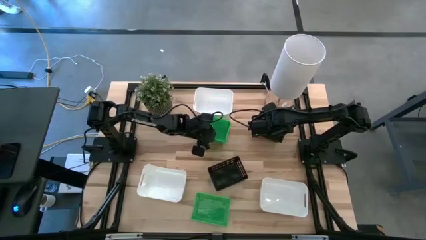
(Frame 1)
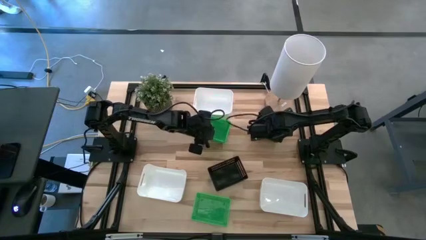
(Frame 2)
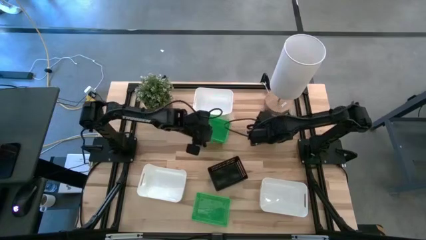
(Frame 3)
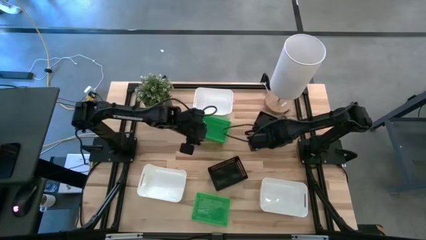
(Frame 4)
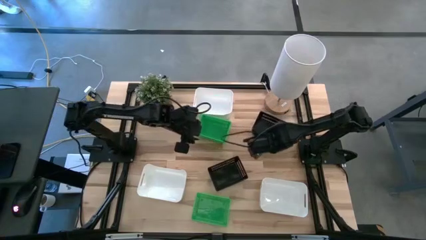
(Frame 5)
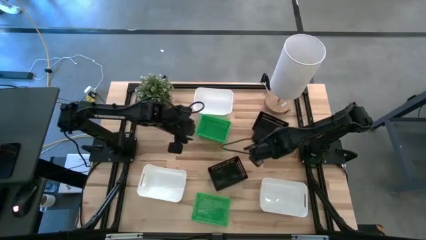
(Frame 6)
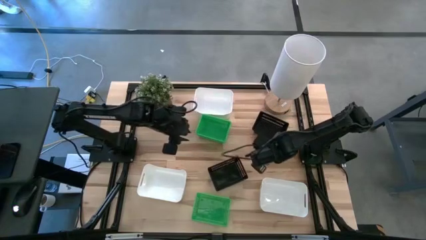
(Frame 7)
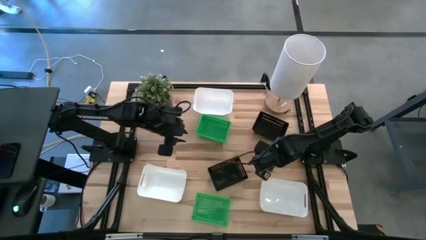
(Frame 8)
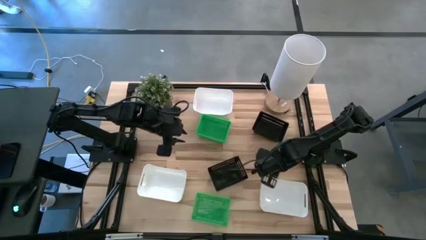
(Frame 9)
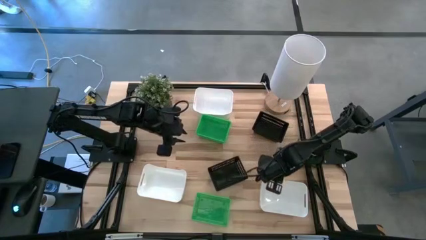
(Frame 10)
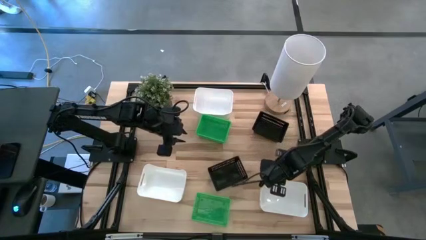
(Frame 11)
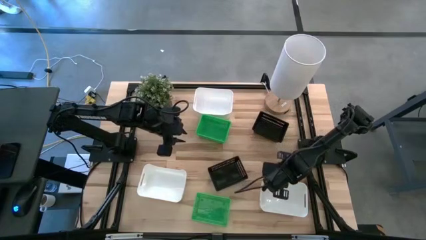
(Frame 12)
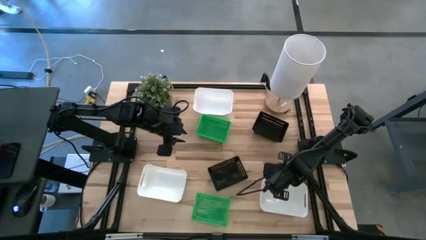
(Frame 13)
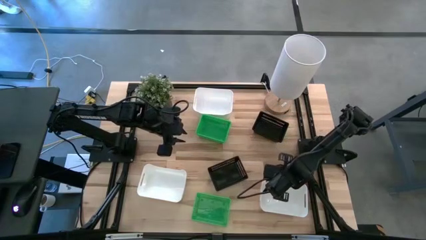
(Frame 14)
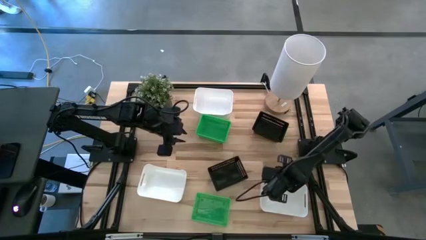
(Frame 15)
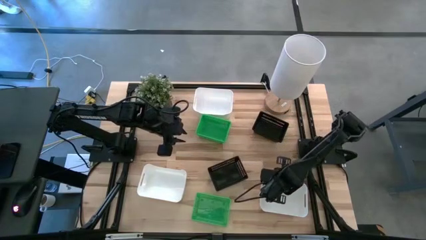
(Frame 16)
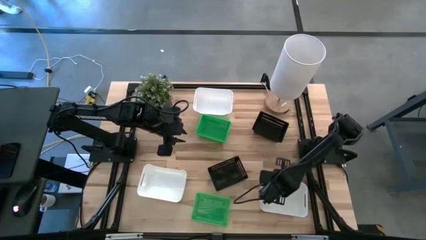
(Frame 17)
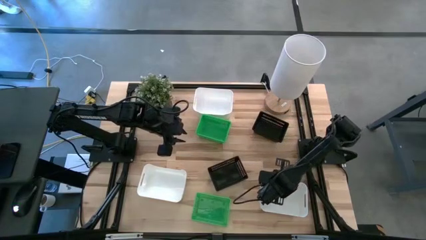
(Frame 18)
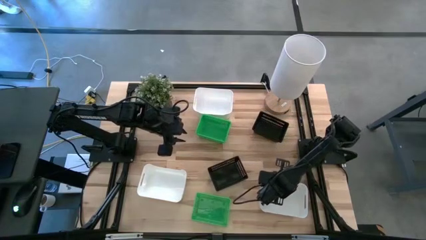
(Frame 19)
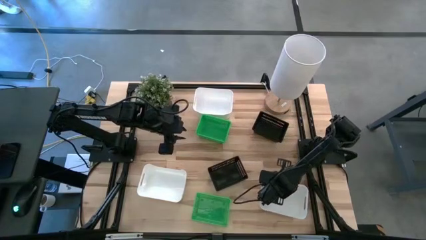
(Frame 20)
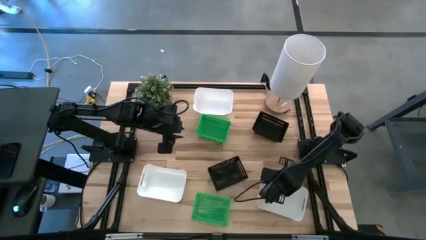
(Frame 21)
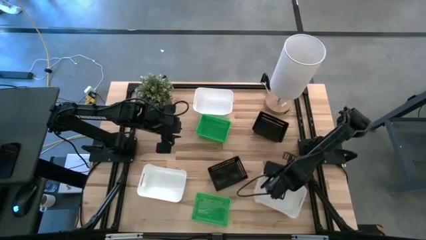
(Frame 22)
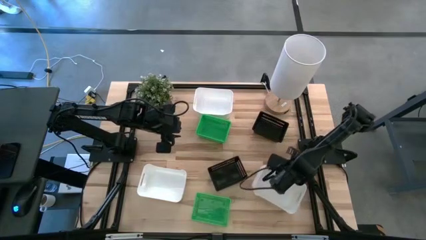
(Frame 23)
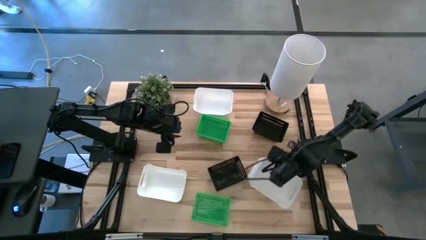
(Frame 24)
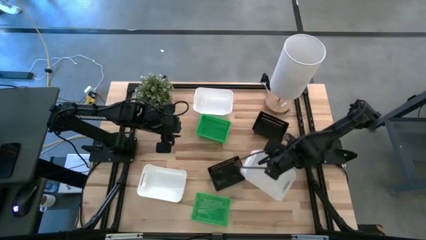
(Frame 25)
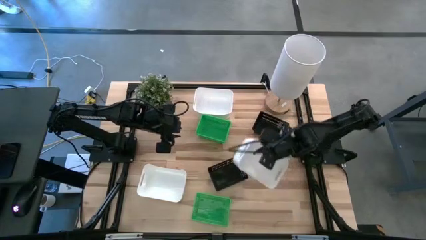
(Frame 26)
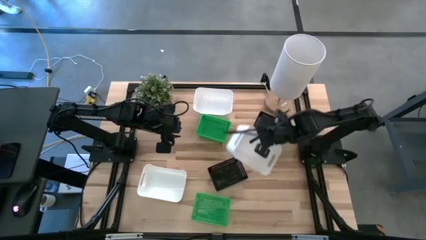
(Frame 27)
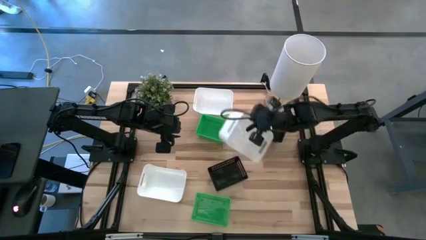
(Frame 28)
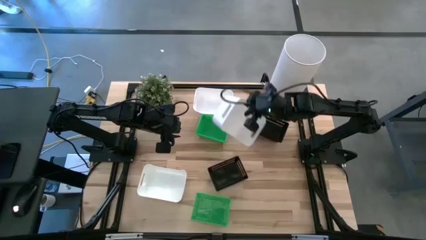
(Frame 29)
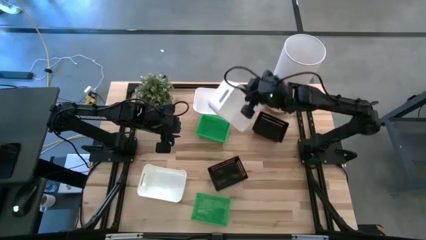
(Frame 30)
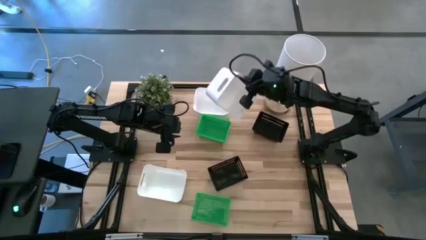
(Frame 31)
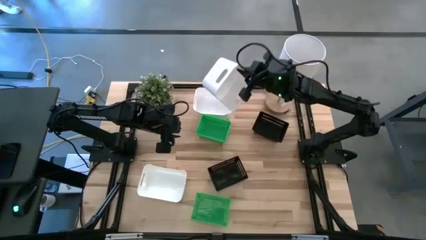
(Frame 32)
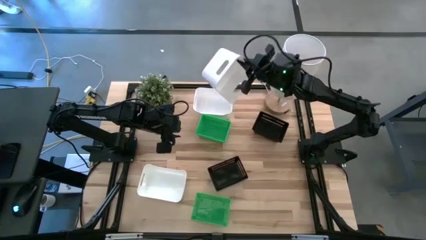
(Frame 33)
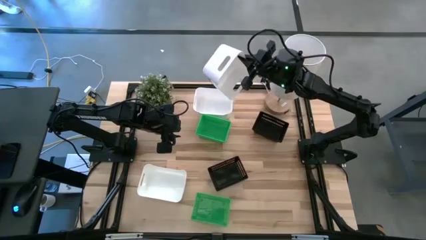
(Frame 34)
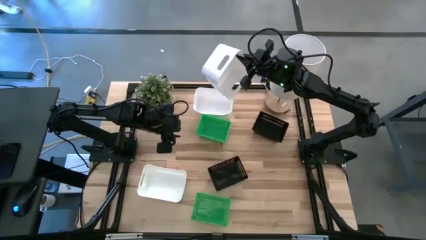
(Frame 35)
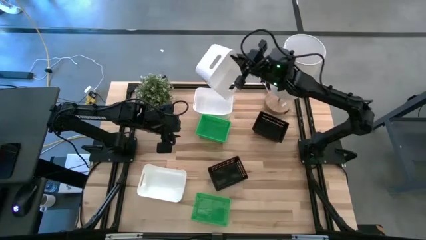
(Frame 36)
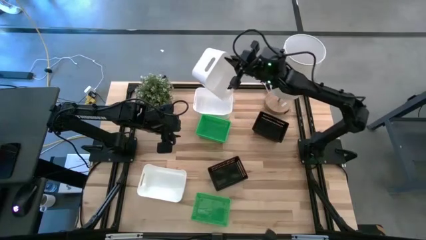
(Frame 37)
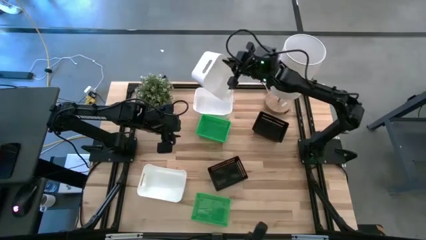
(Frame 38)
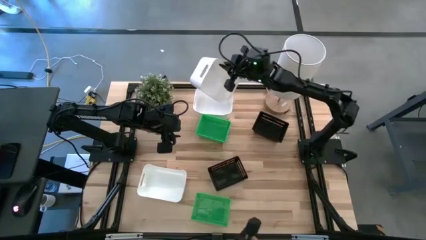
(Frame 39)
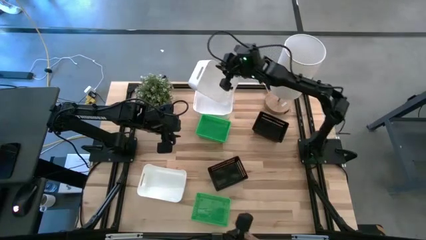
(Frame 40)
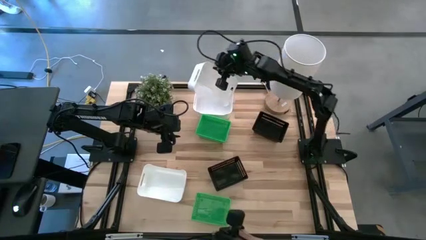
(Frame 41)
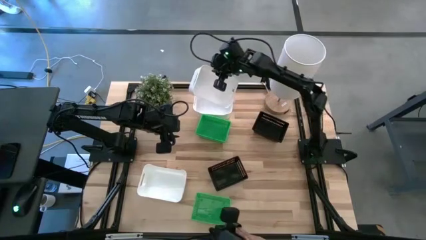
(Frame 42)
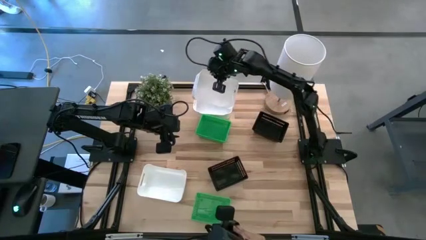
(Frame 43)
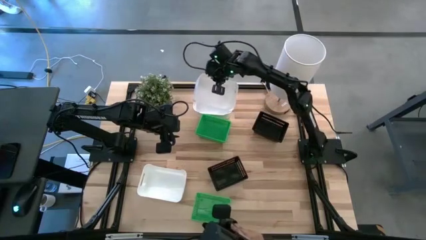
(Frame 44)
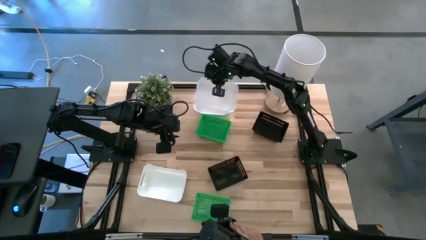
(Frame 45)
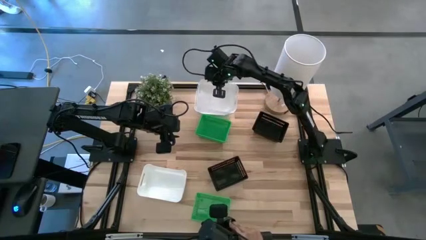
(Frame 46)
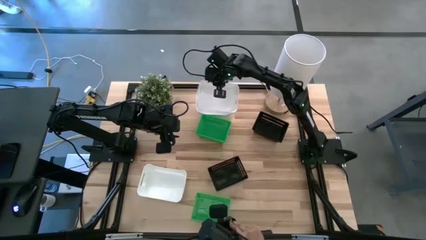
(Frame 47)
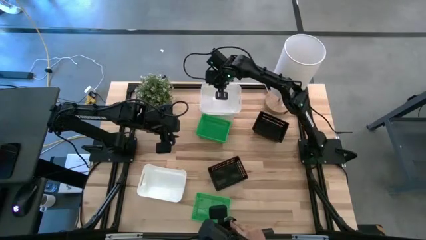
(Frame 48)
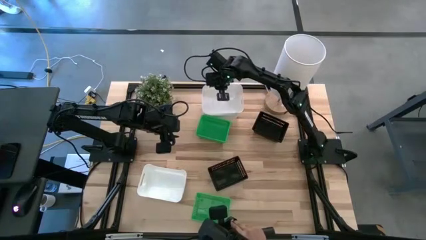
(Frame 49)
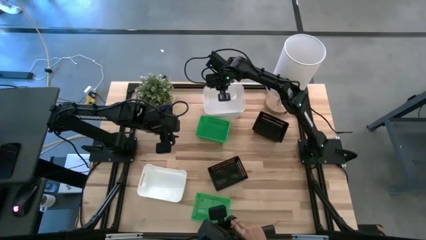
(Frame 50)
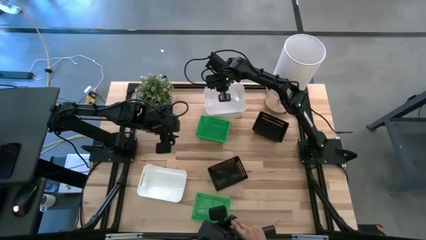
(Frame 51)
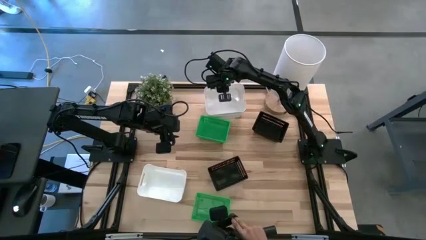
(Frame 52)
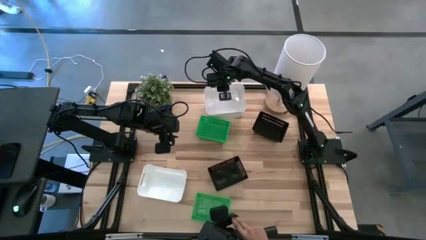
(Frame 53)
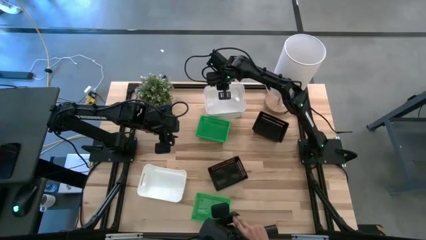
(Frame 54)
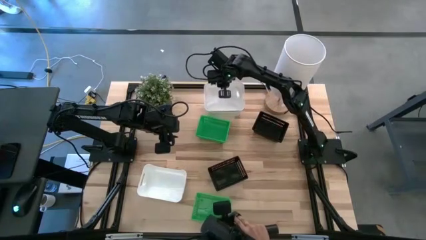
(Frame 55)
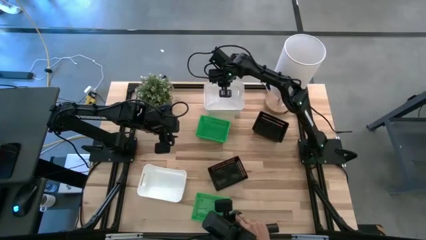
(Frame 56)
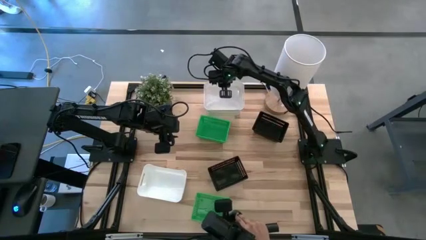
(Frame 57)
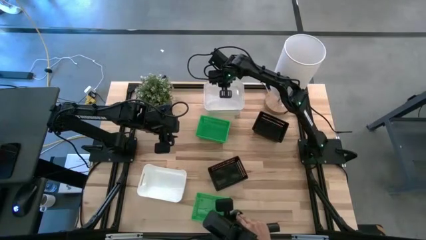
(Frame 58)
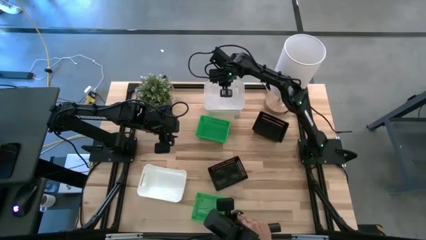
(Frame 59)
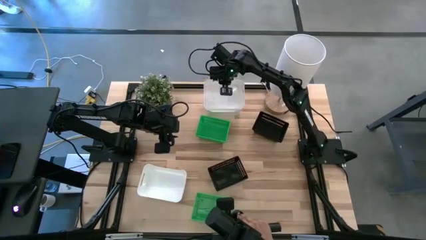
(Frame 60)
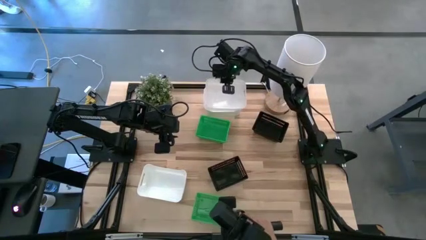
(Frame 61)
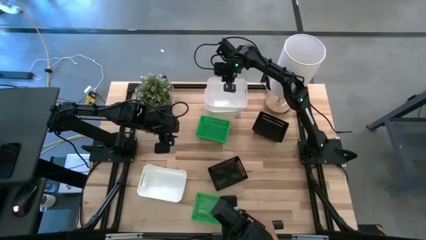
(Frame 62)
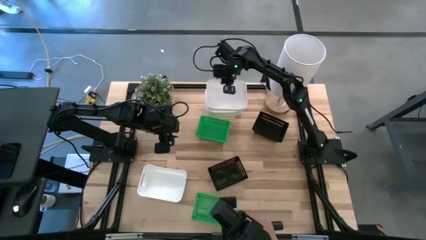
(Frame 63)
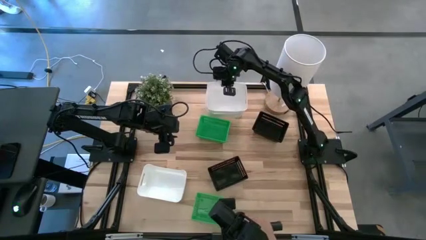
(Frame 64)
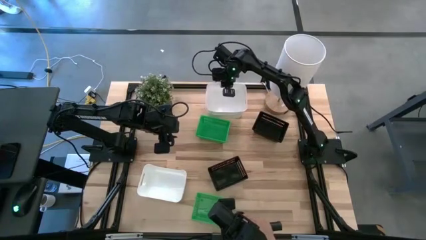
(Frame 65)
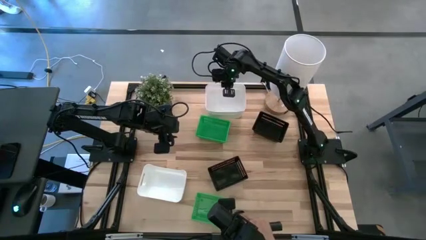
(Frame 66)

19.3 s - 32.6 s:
Stack the bottom right white bin on top of the top white bin
